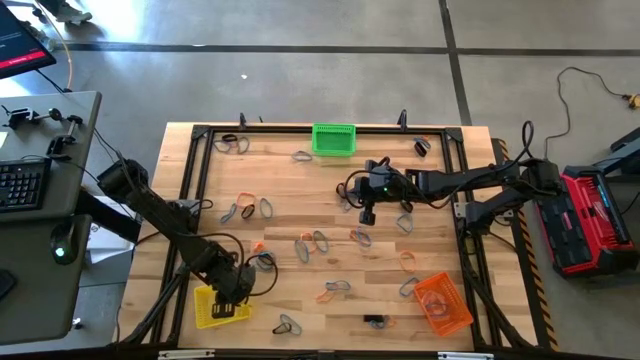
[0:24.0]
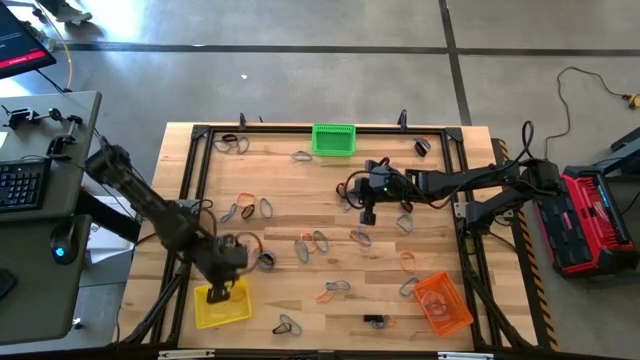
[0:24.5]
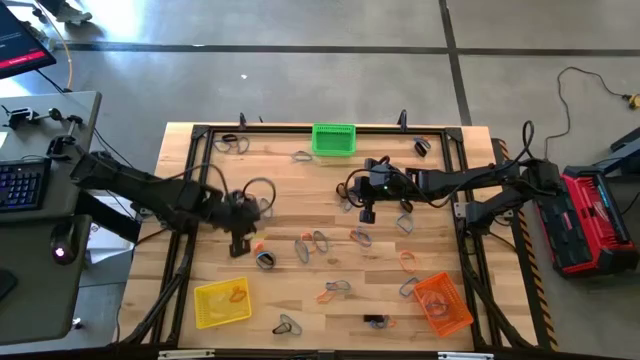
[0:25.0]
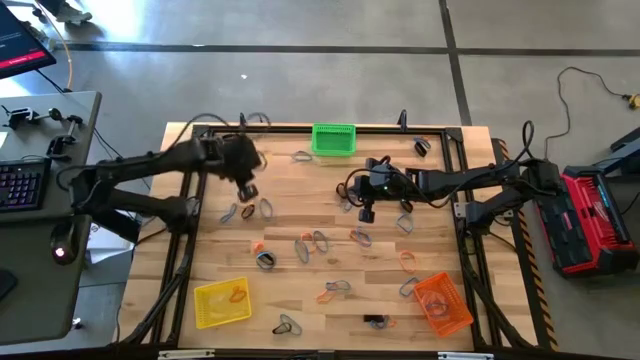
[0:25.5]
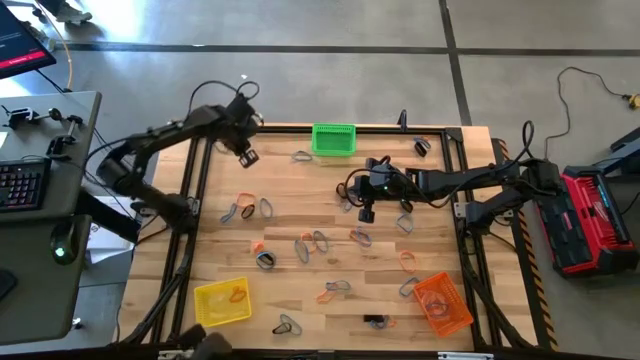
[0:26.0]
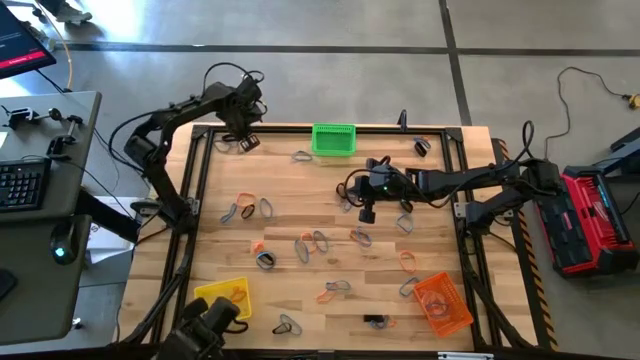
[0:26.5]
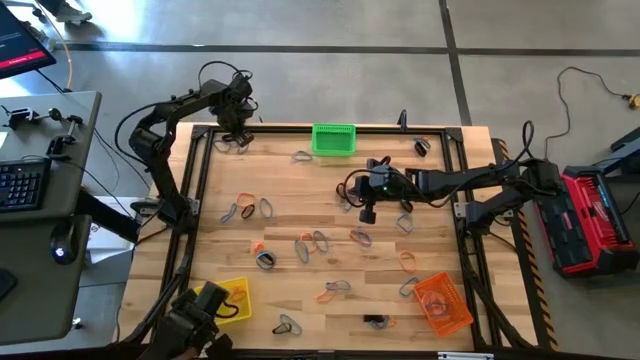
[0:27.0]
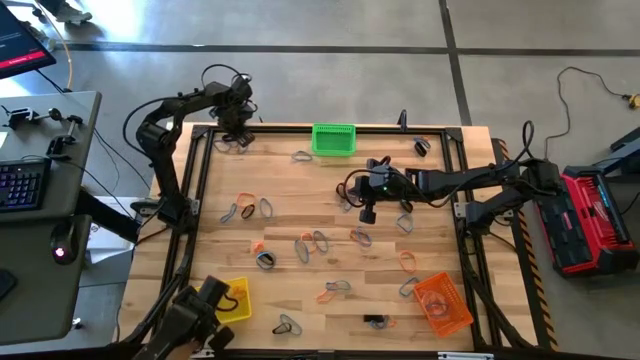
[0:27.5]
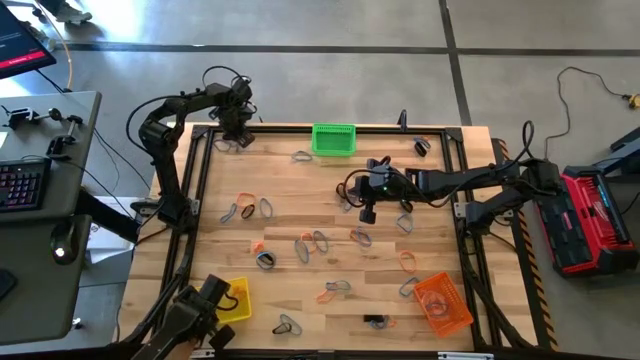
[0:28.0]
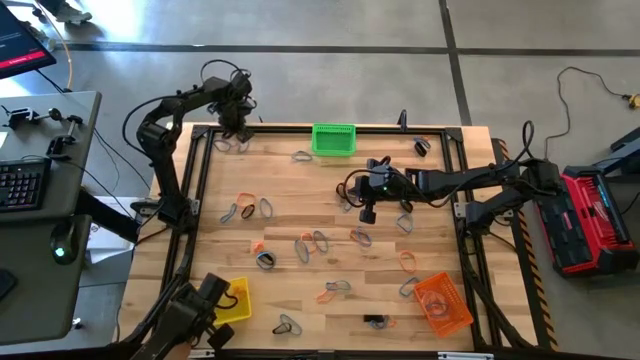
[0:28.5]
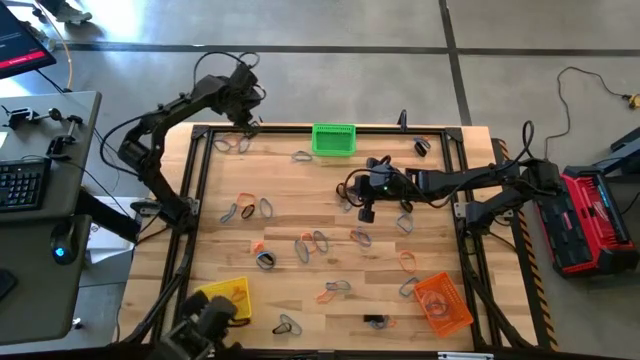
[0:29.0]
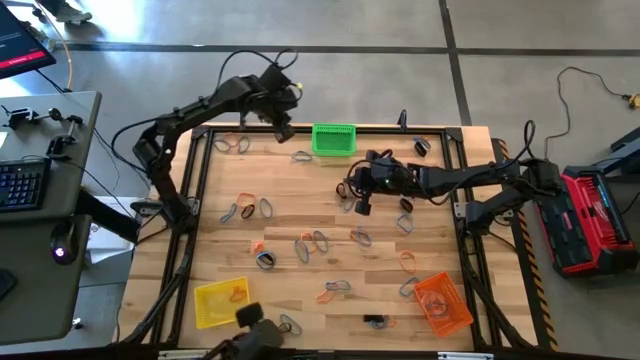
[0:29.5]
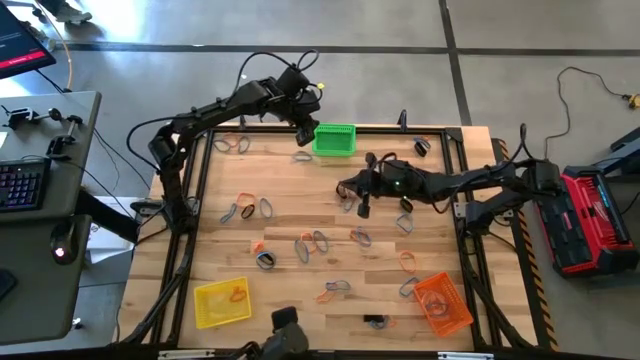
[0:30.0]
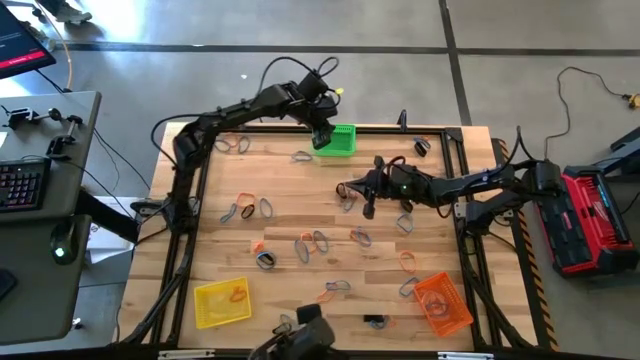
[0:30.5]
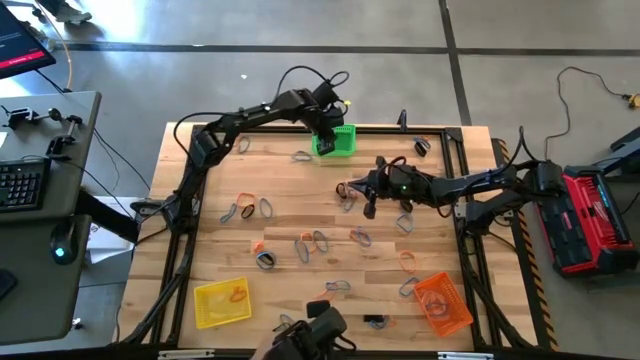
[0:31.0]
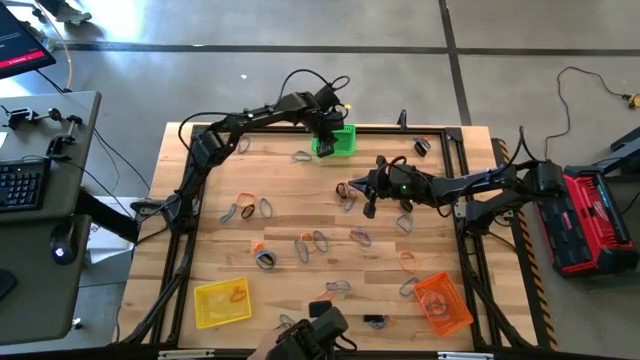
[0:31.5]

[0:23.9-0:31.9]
Task: Sort rubber bands into baskets
Put the black rubber band into the green bin

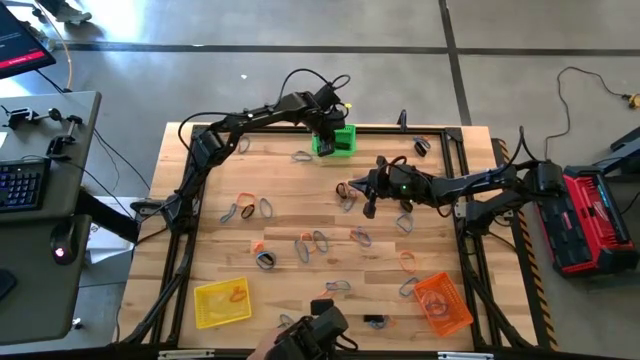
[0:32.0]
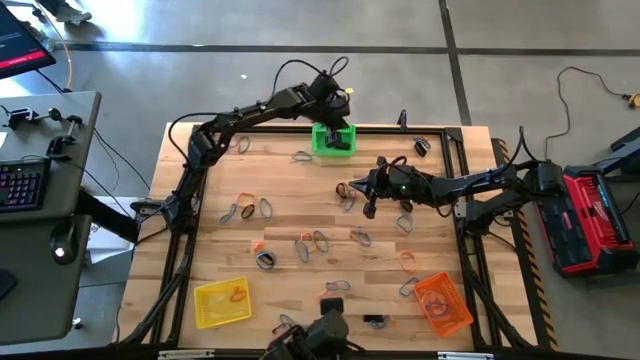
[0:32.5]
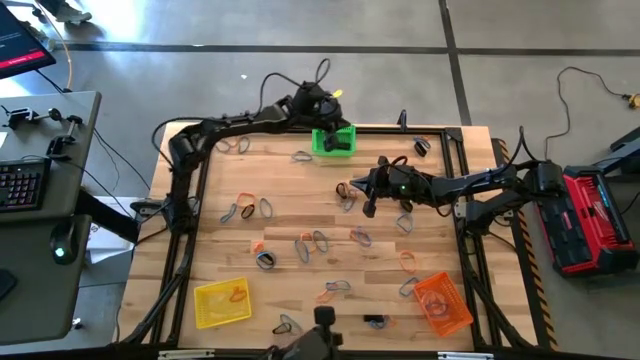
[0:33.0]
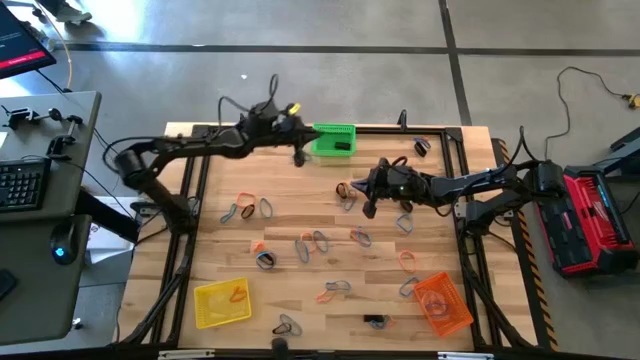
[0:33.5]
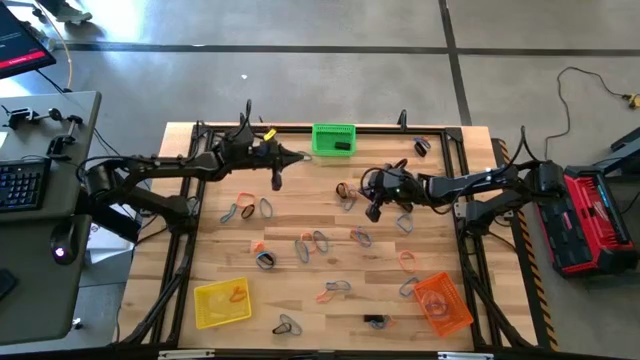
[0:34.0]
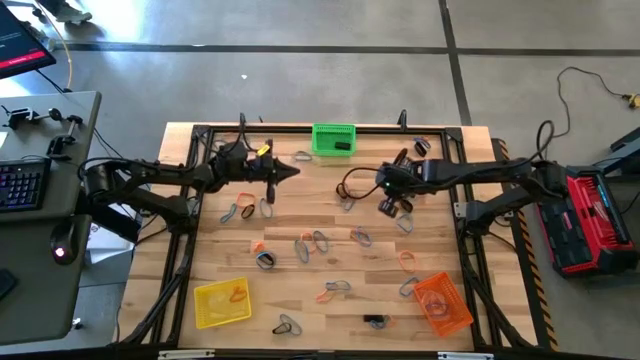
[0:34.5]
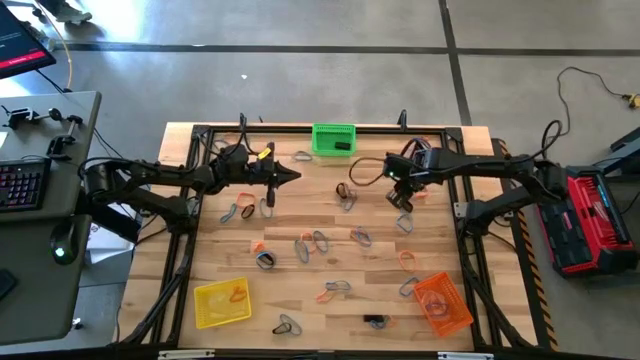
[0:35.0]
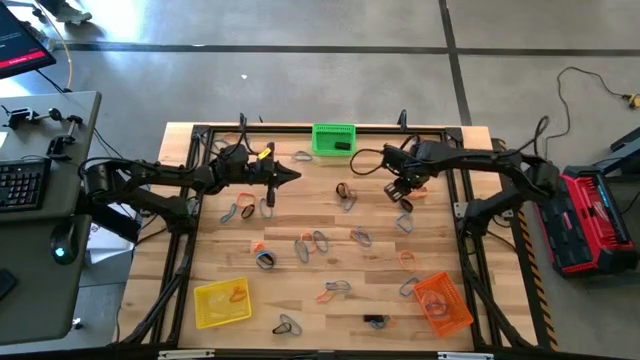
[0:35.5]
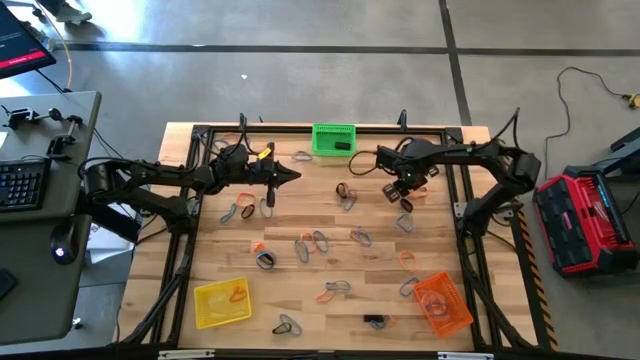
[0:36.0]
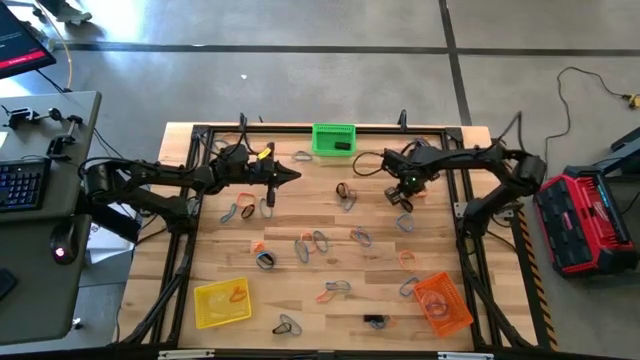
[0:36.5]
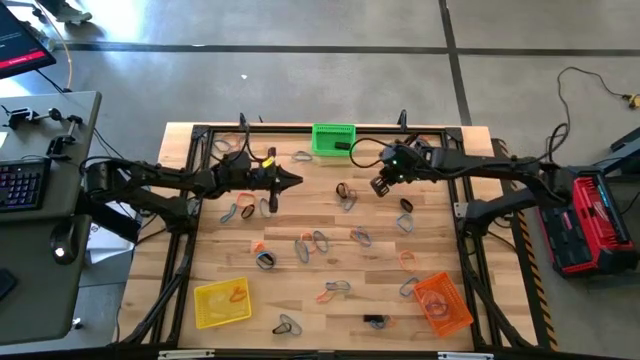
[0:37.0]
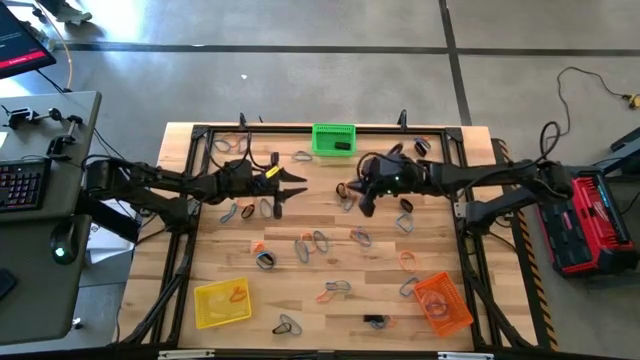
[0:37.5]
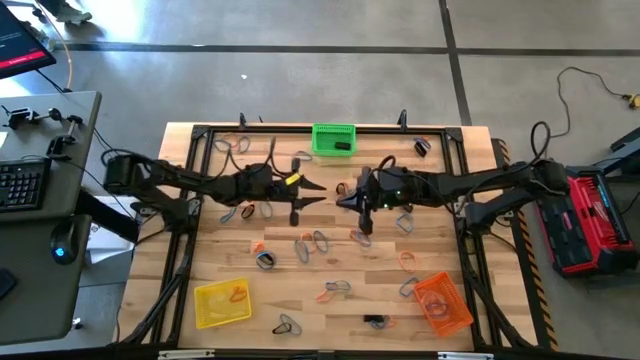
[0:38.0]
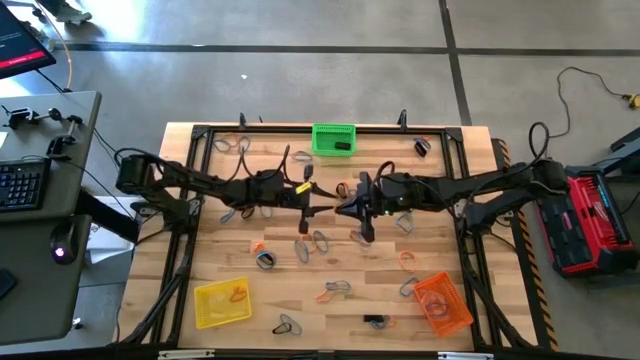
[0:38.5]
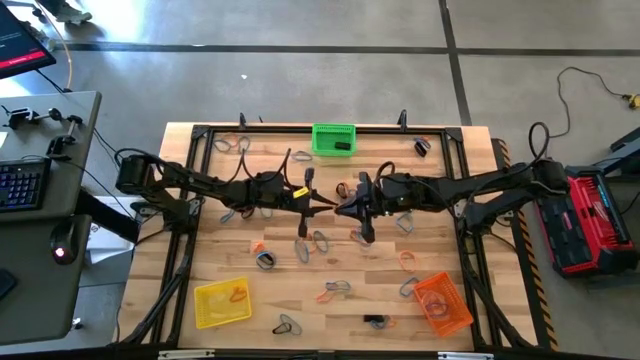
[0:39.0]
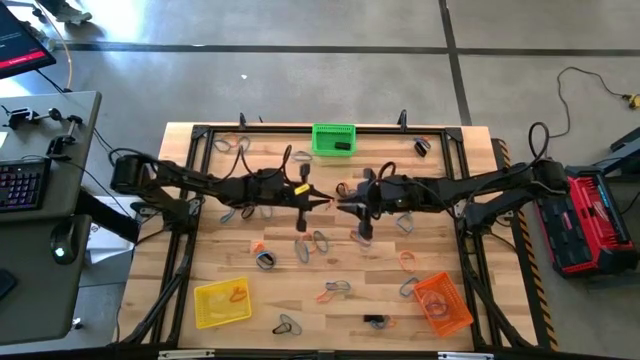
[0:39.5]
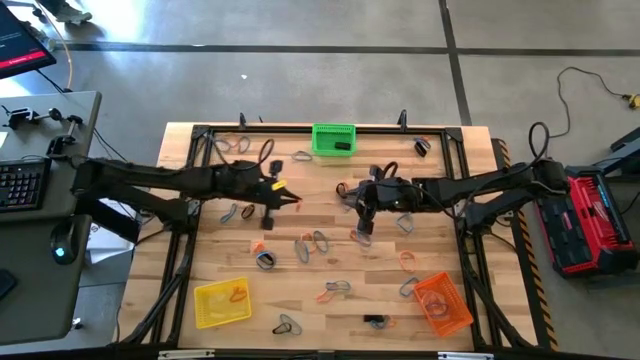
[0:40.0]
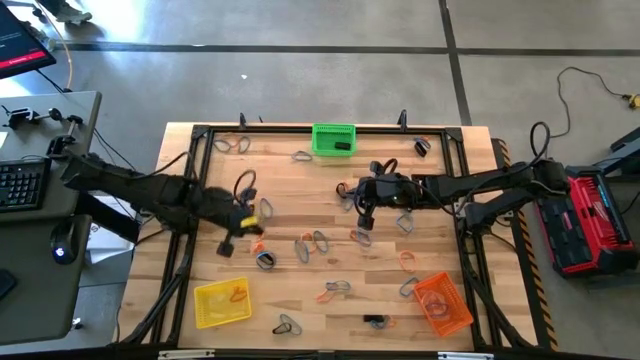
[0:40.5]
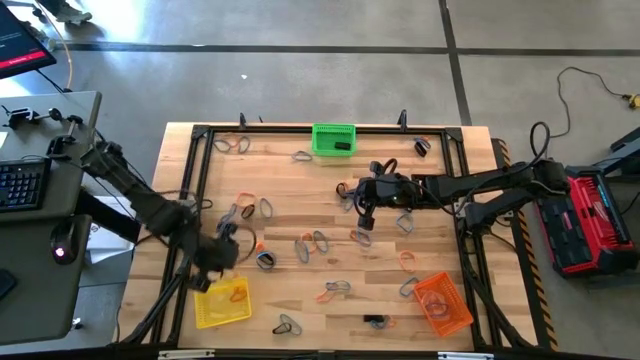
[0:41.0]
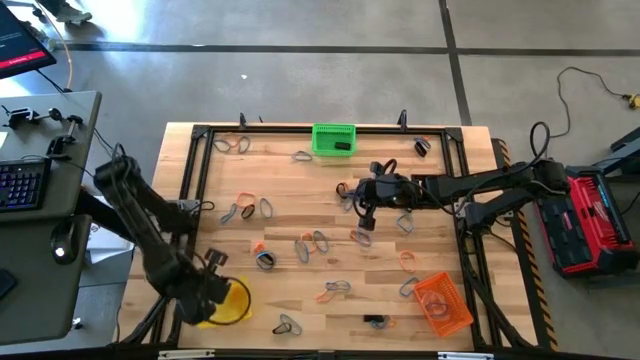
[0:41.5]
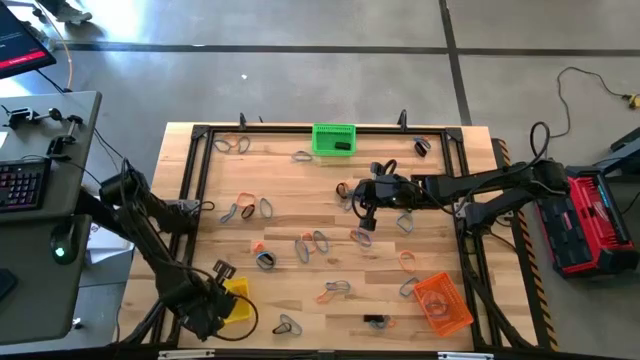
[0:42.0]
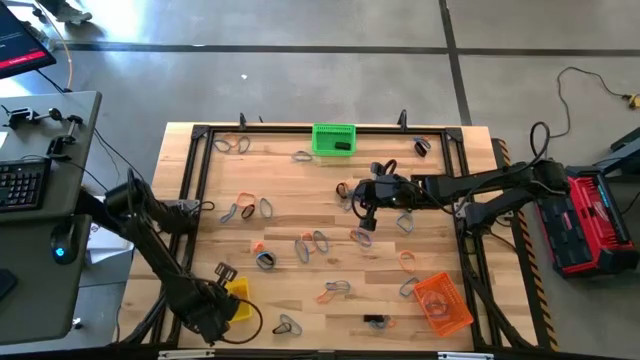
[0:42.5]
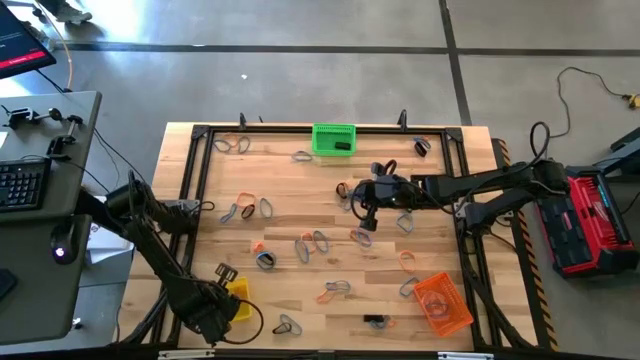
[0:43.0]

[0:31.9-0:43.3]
Put the orange rubber band into the yellow bin

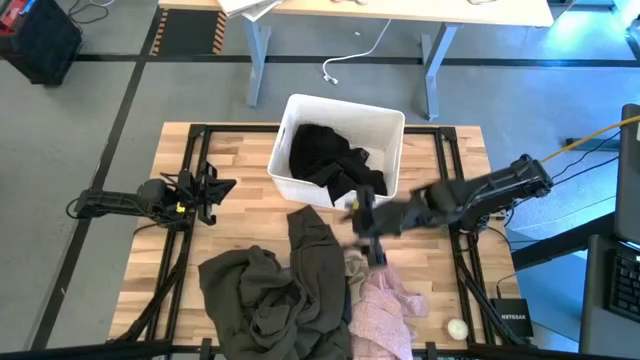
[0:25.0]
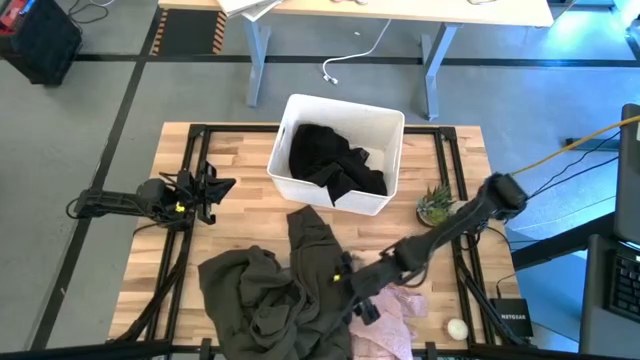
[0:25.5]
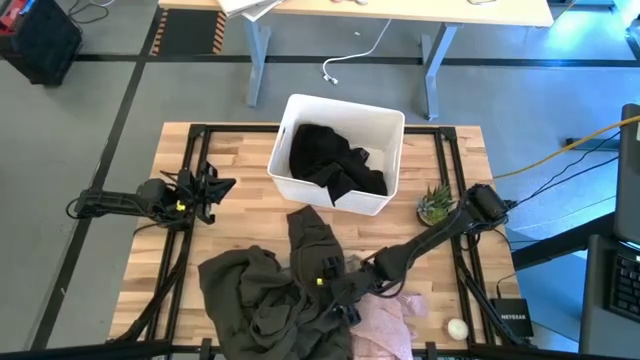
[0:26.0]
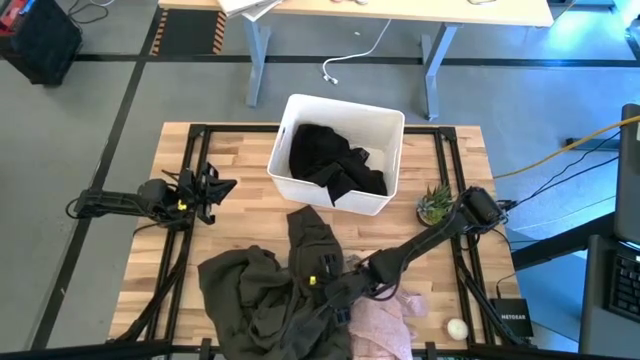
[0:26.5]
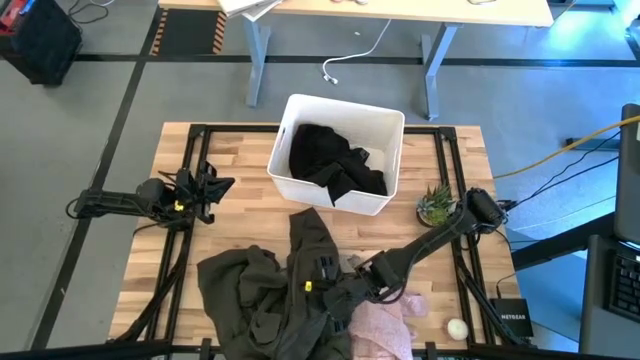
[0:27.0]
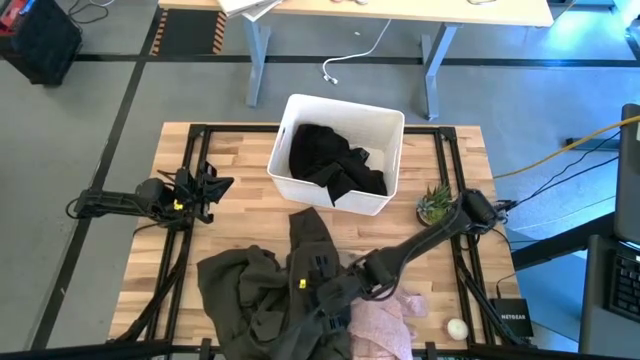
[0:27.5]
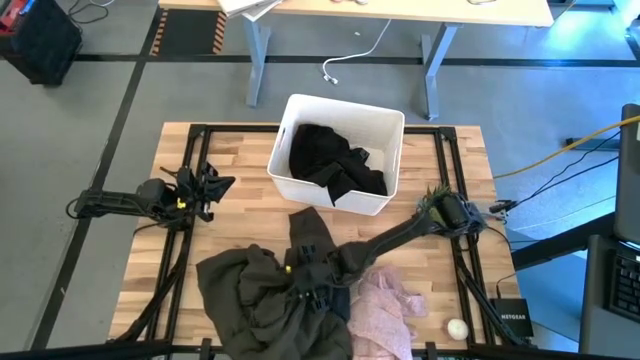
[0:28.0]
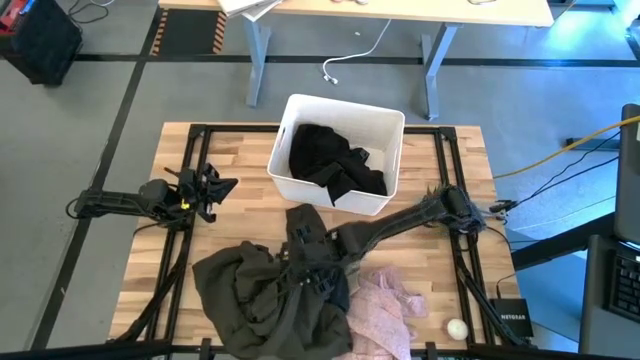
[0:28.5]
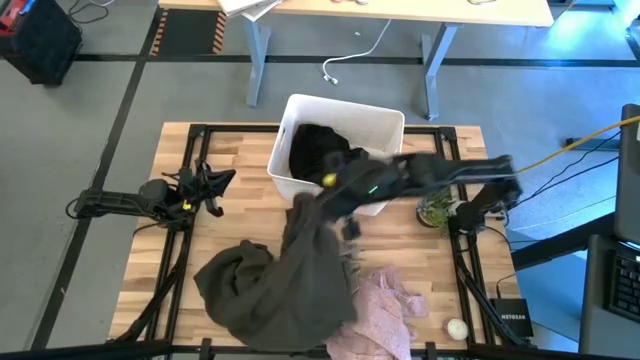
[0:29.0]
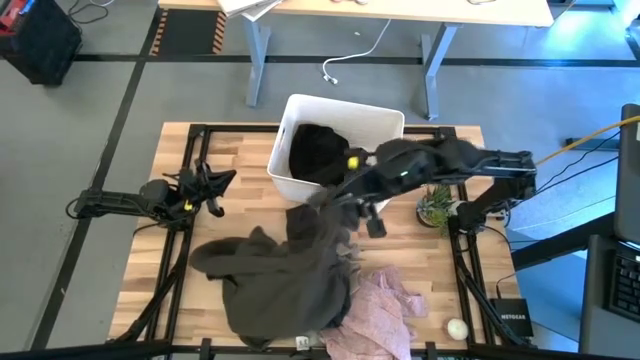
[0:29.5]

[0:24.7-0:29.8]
Task: Sort clothes
Put the gray hoodie into the white bin
